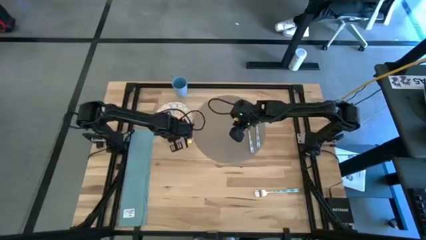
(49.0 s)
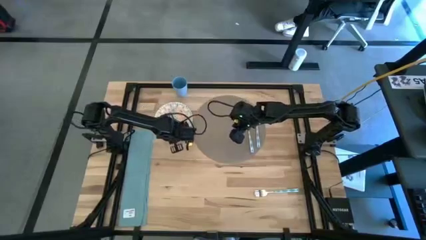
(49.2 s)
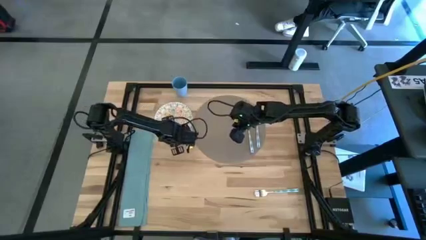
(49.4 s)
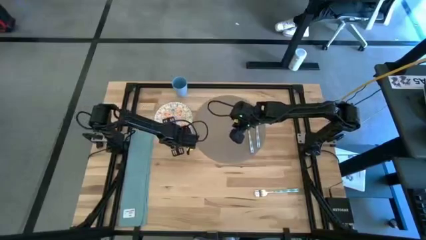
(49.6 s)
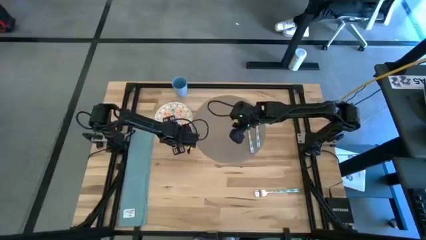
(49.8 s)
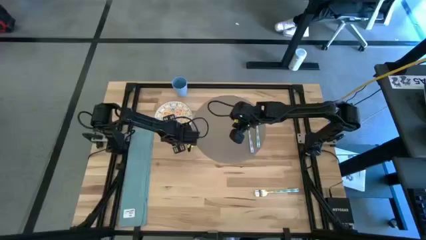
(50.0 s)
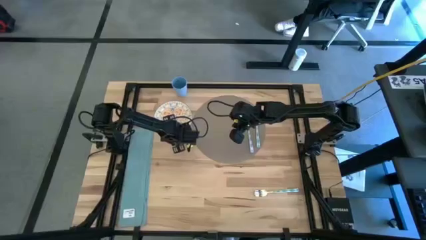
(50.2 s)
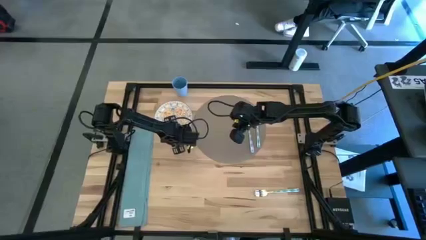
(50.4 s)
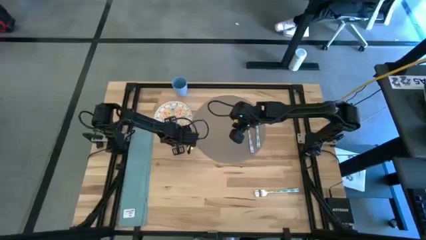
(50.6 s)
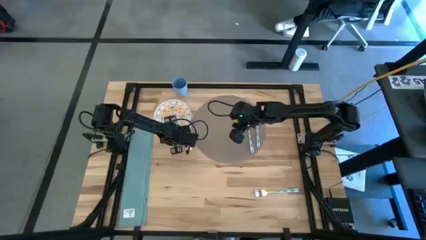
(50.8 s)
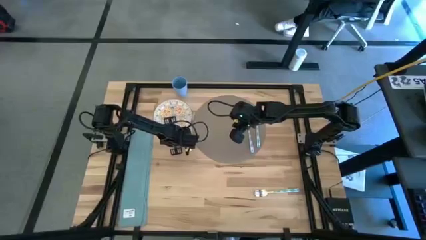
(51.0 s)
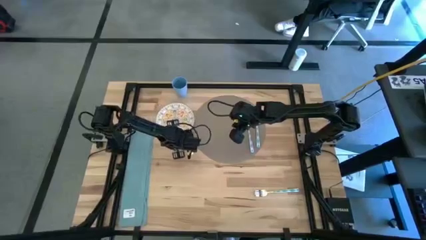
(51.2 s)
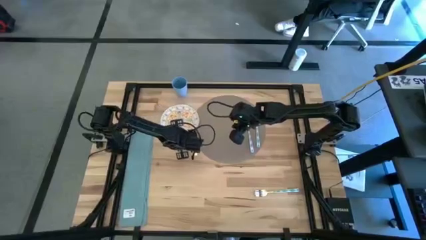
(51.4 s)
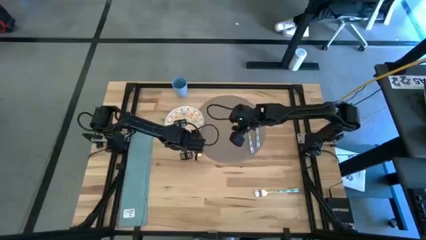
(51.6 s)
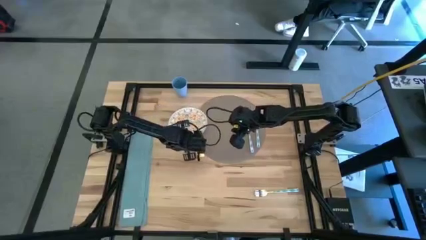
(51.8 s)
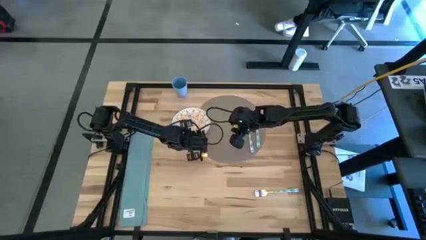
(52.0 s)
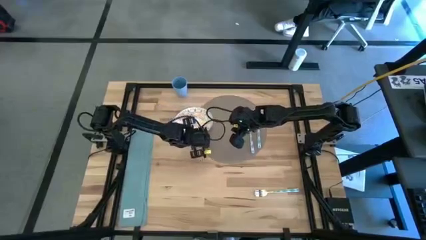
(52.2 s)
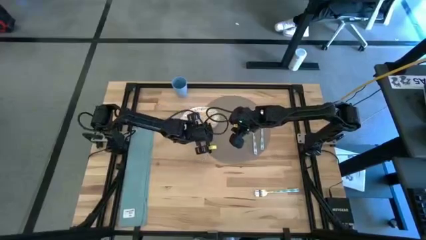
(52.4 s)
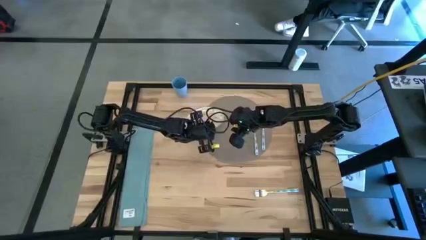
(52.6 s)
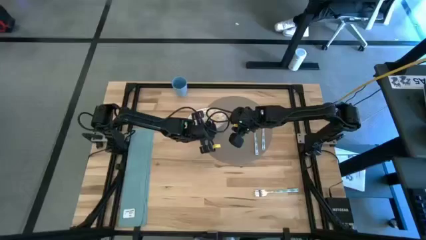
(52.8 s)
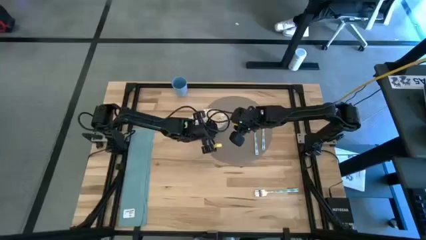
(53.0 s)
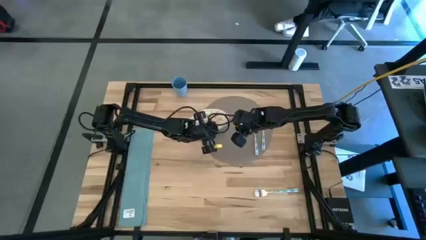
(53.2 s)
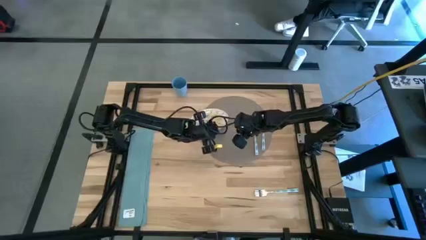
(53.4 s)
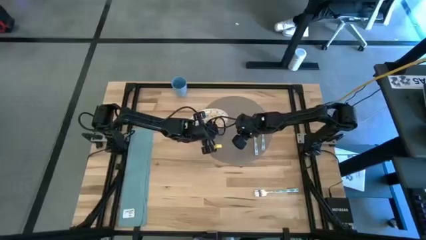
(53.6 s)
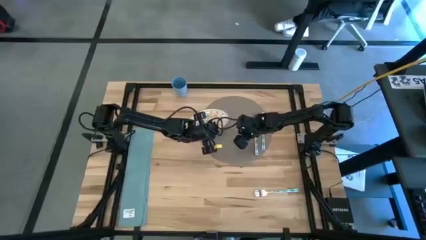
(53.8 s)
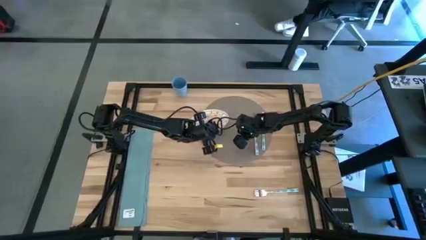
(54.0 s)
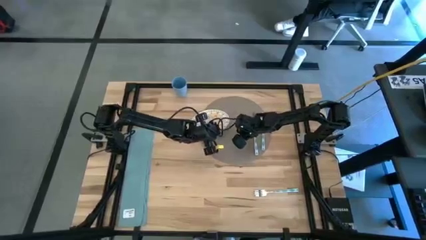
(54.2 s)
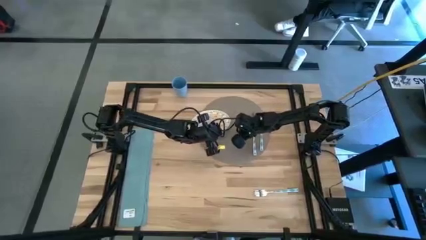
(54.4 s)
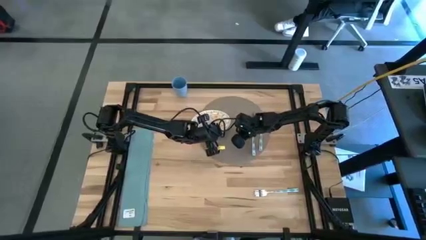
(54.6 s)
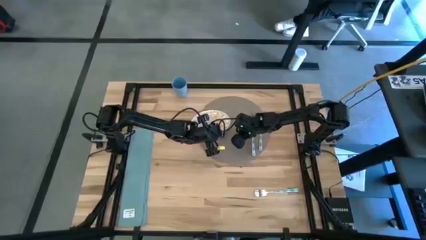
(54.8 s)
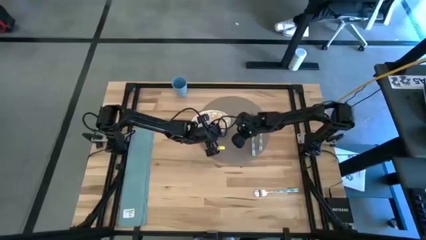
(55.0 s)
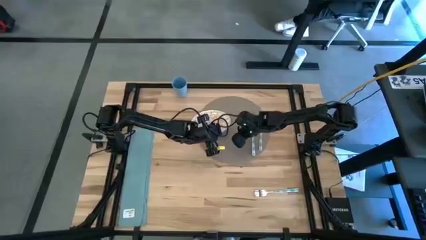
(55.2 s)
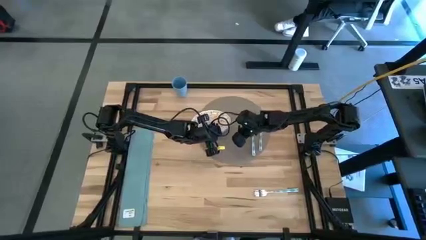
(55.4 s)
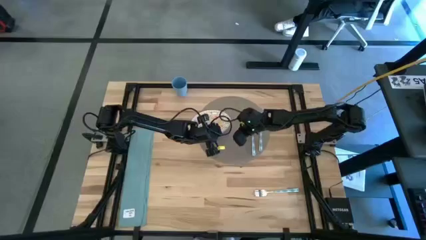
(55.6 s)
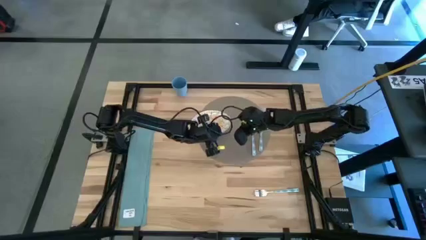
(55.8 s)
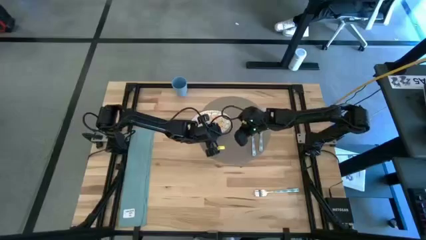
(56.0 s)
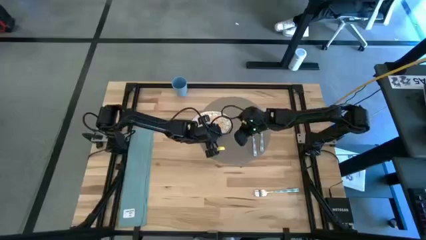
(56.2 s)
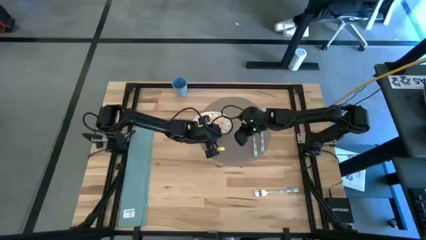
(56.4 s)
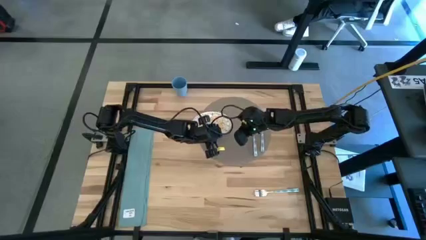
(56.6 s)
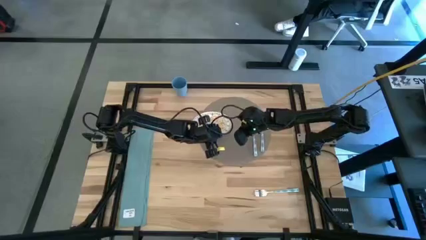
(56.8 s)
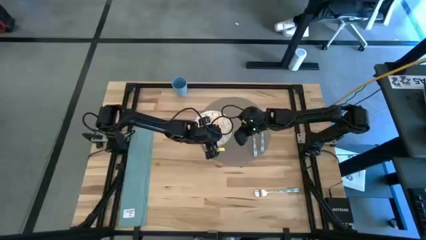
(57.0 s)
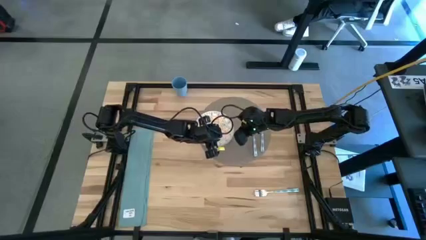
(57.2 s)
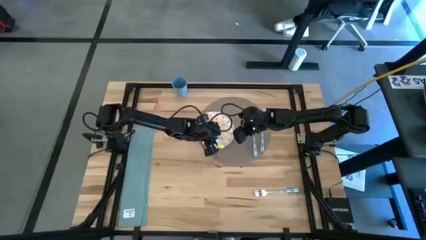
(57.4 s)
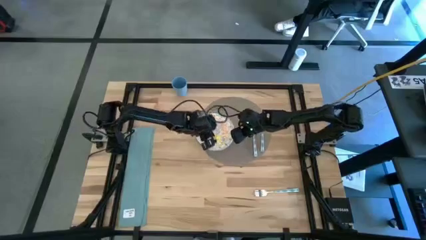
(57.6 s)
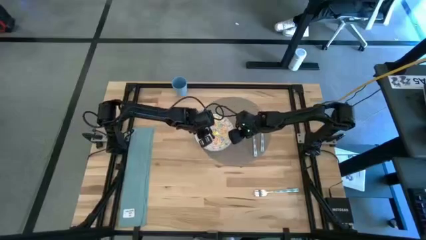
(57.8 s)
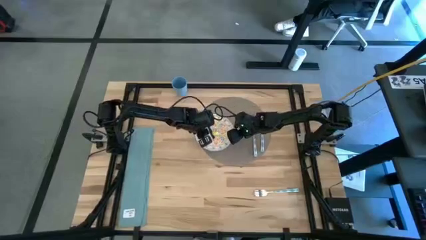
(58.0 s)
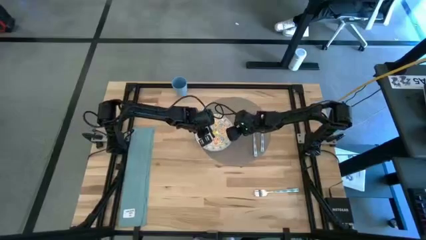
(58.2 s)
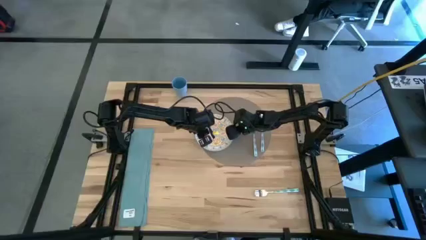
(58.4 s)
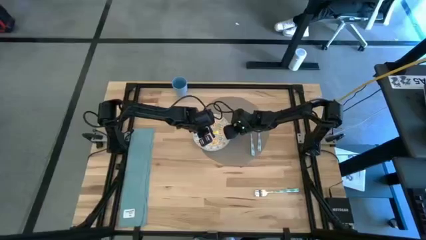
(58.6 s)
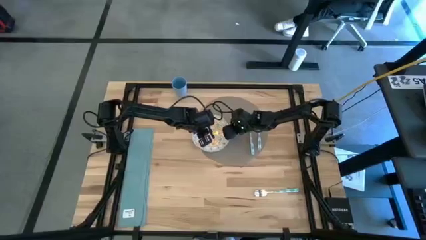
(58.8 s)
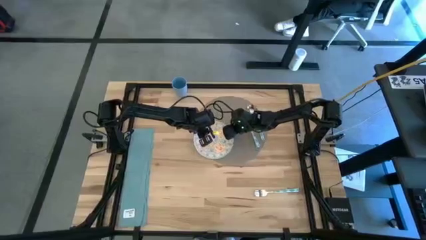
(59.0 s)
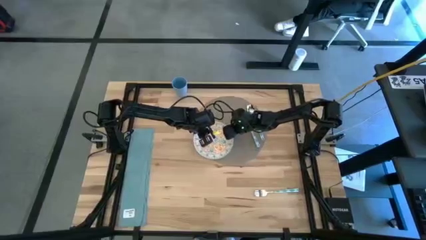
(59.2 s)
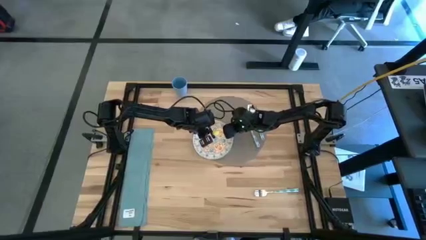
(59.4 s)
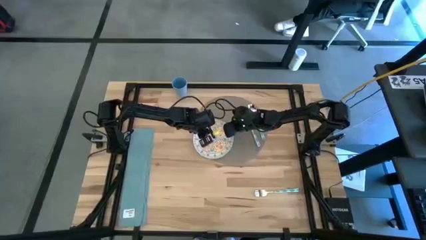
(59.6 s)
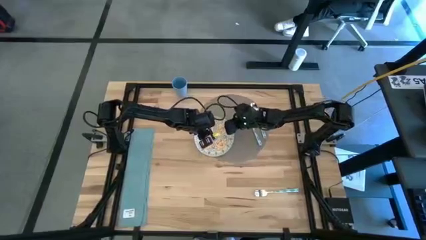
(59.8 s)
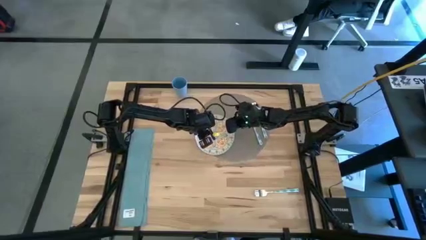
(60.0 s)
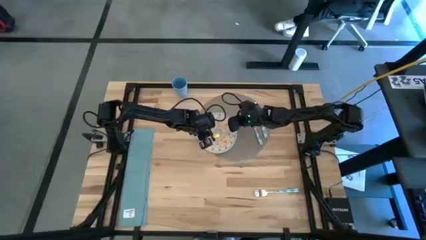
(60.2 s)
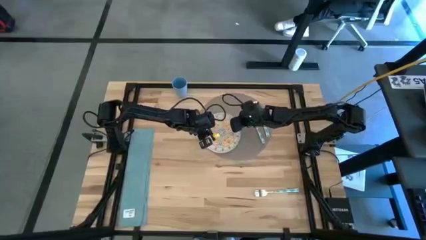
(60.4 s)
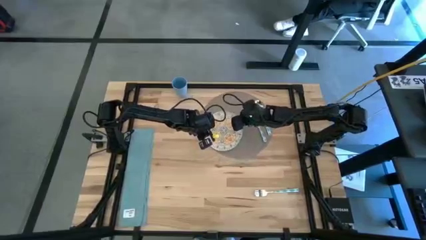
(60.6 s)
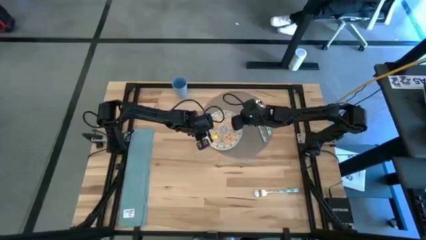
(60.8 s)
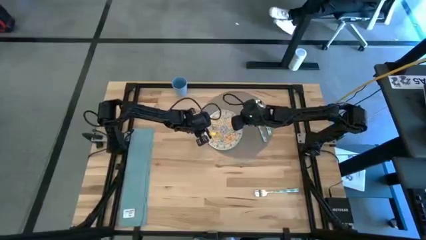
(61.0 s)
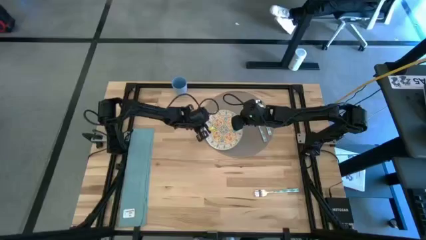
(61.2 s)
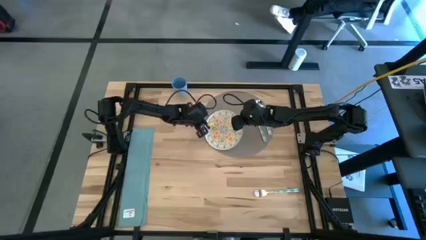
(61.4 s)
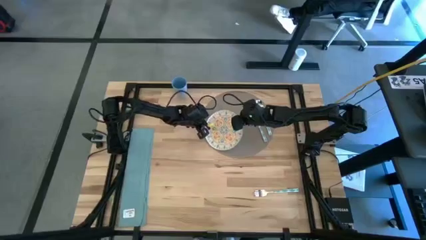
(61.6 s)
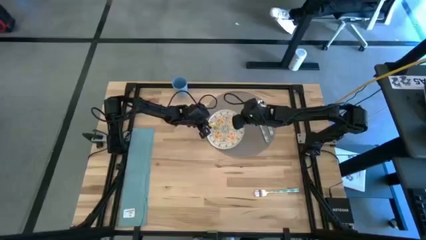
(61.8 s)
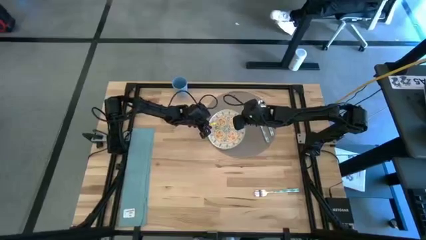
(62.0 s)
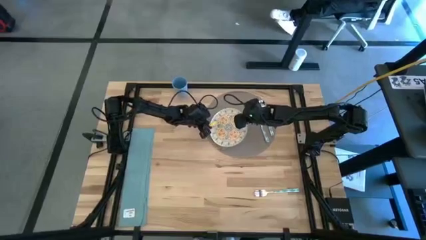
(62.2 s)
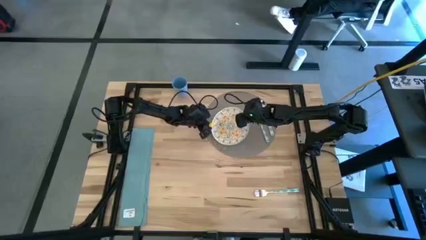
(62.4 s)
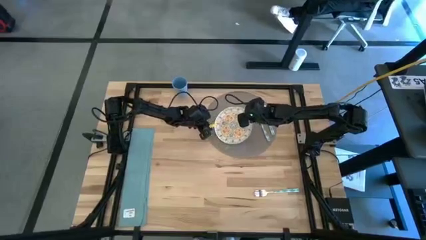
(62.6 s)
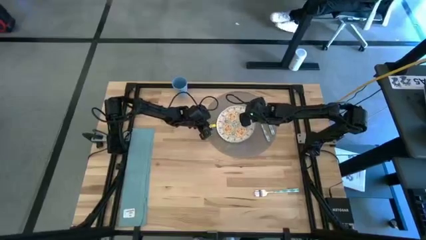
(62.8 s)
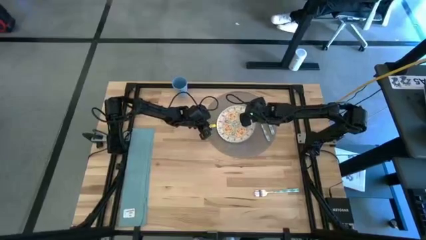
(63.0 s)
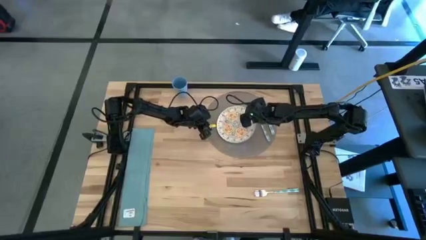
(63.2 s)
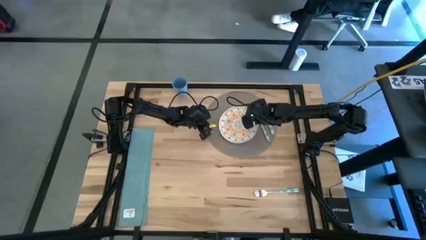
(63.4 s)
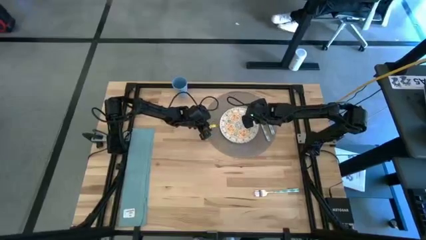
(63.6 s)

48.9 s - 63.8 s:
Task: Set table place
Put the blue plate on the brown mat

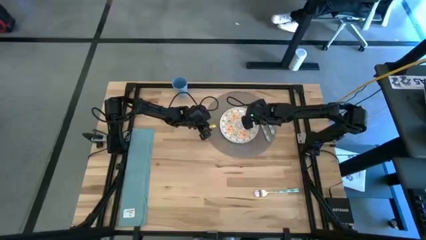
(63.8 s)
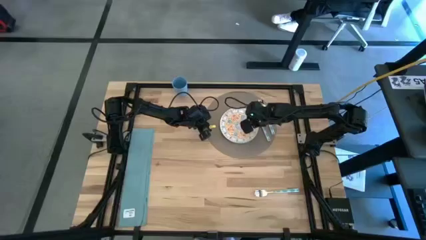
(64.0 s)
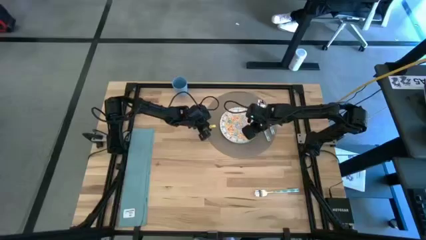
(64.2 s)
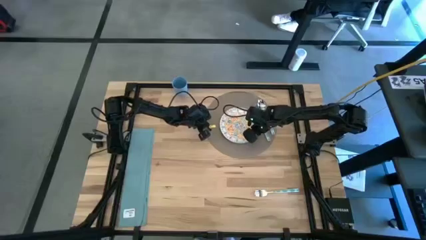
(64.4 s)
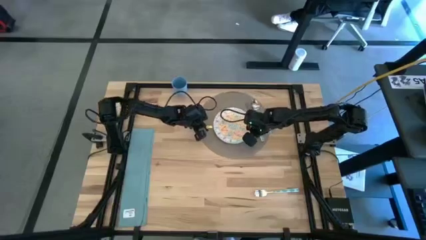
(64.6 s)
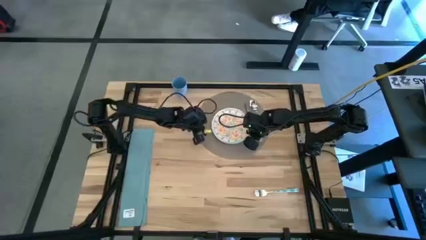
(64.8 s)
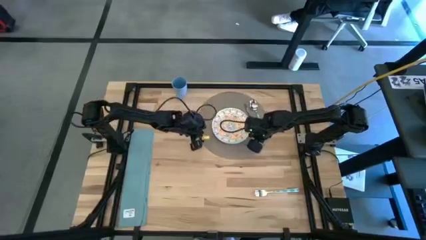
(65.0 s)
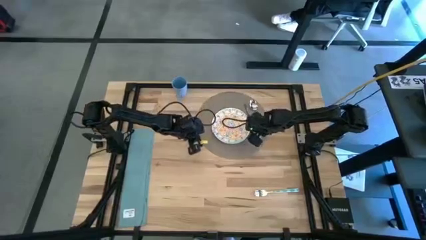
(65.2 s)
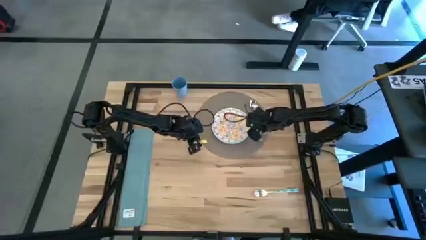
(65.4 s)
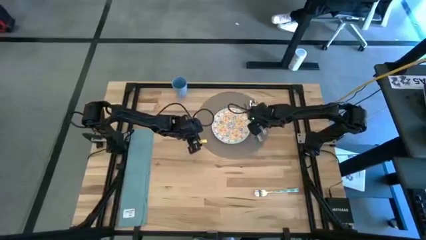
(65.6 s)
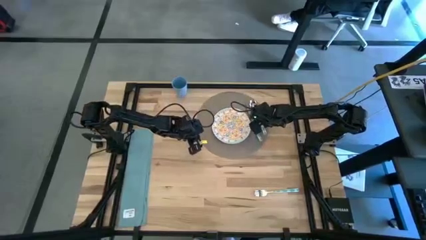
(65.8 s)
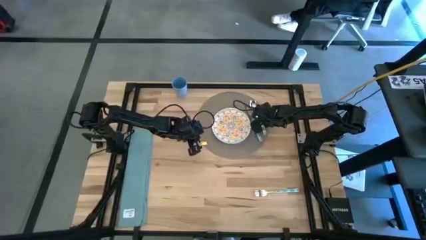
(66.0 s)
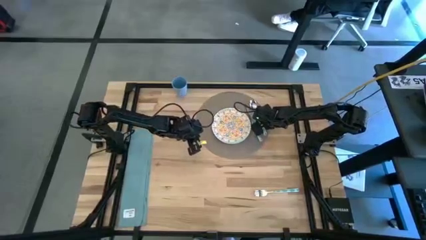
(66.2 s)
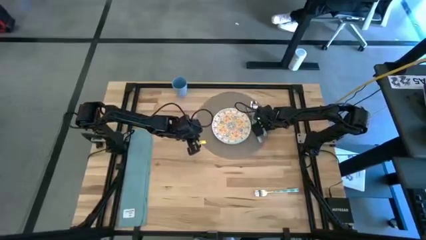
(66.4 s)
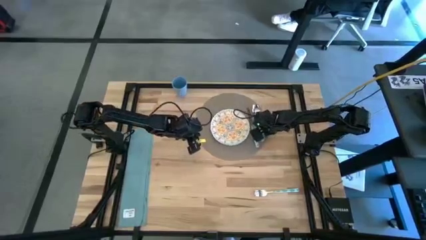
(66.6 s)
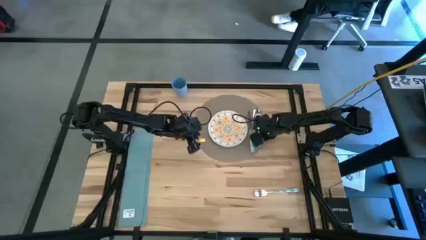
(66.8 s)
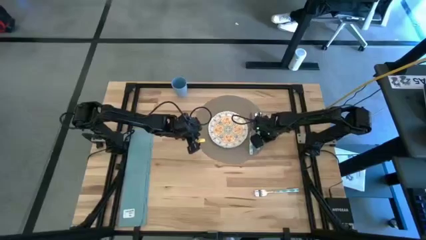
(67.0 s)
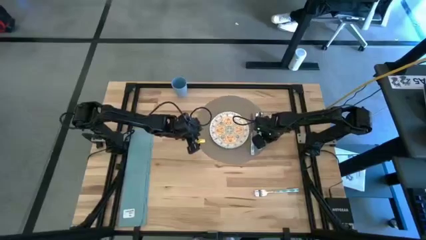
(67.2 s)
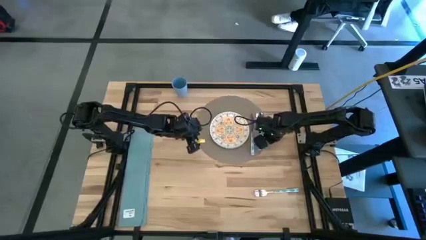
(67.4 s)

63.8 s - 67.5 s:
Adjust the brown mat
